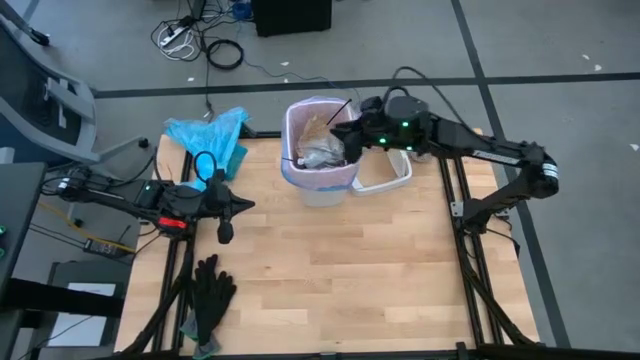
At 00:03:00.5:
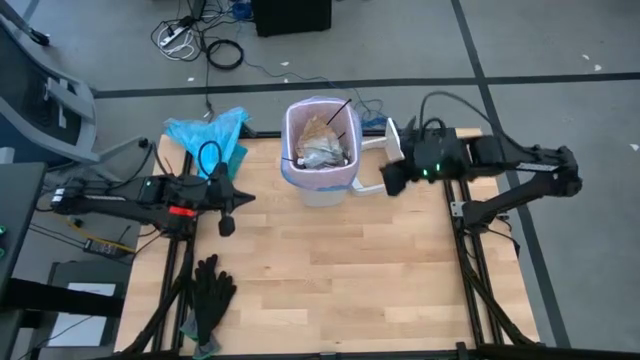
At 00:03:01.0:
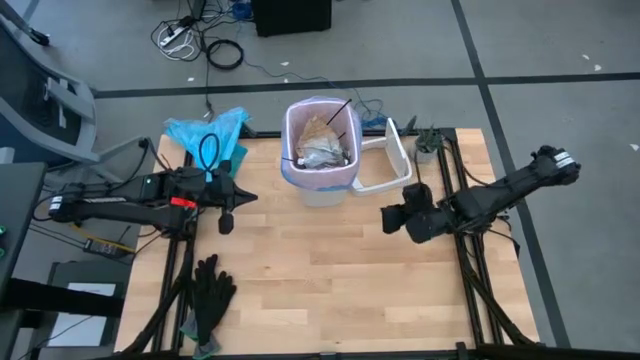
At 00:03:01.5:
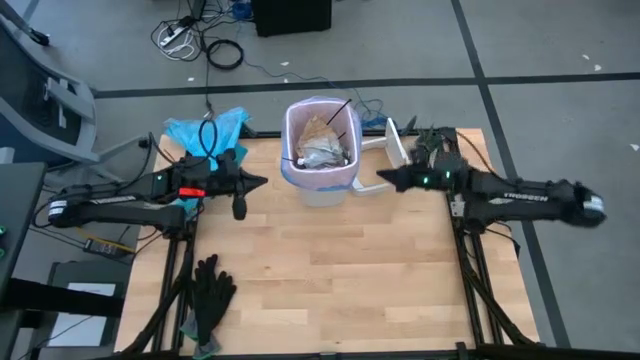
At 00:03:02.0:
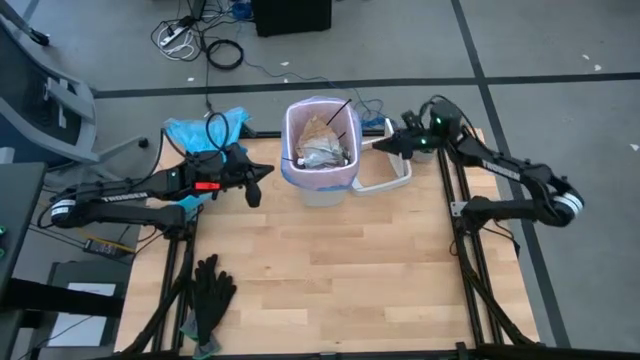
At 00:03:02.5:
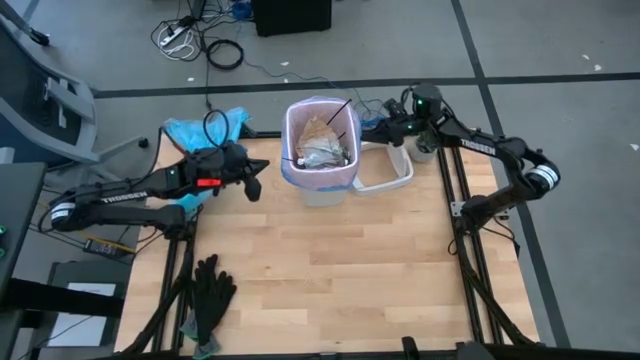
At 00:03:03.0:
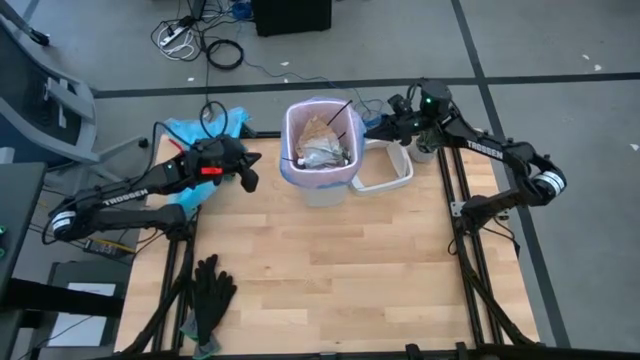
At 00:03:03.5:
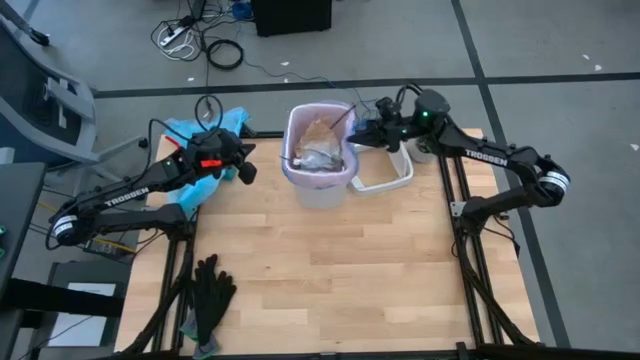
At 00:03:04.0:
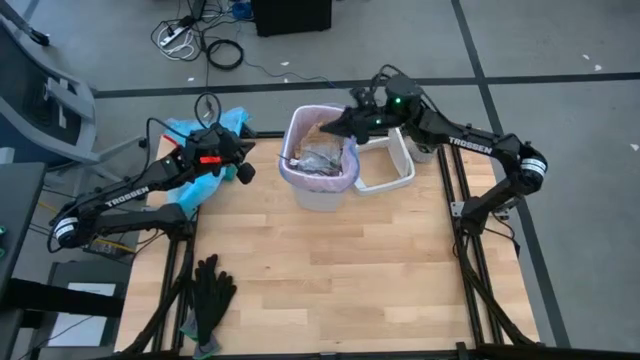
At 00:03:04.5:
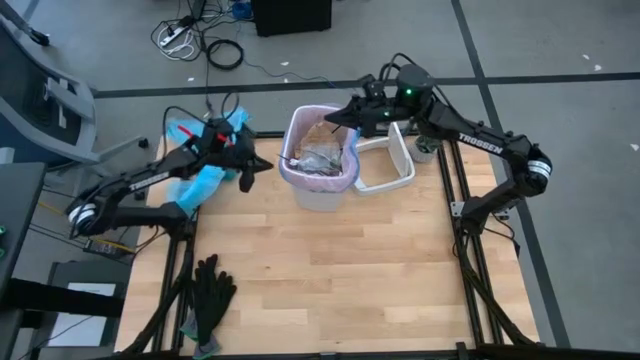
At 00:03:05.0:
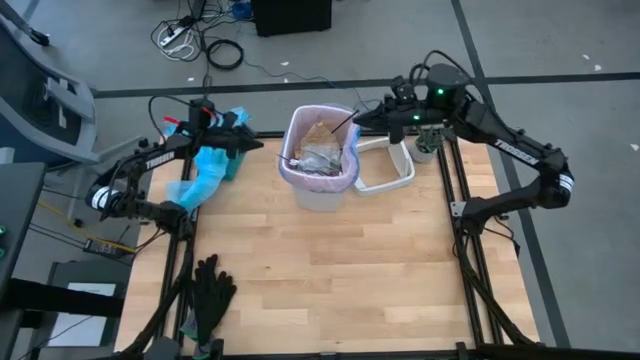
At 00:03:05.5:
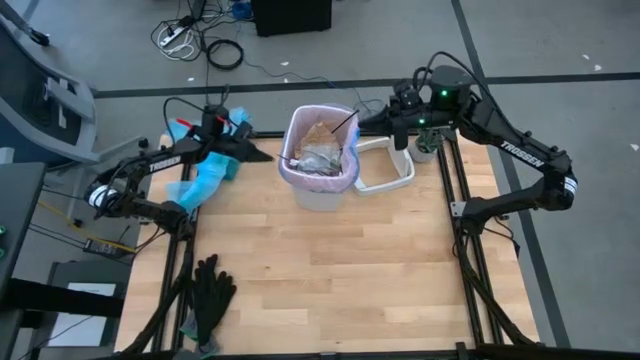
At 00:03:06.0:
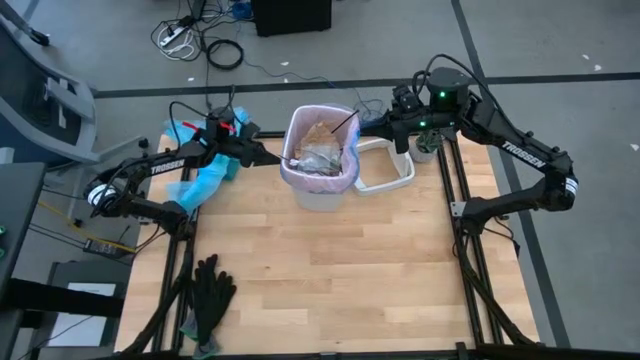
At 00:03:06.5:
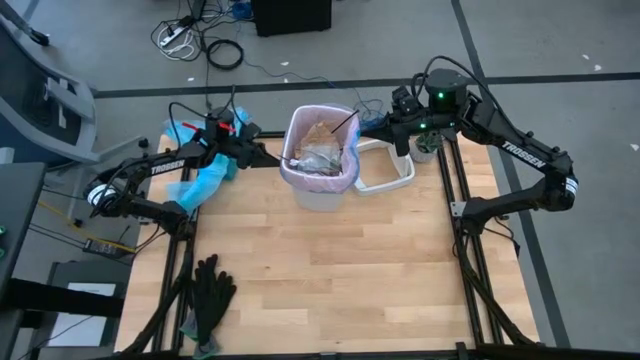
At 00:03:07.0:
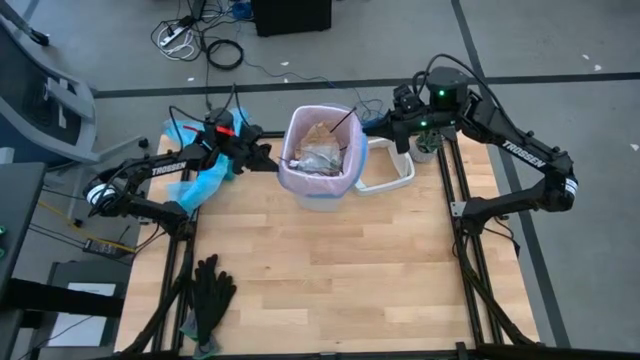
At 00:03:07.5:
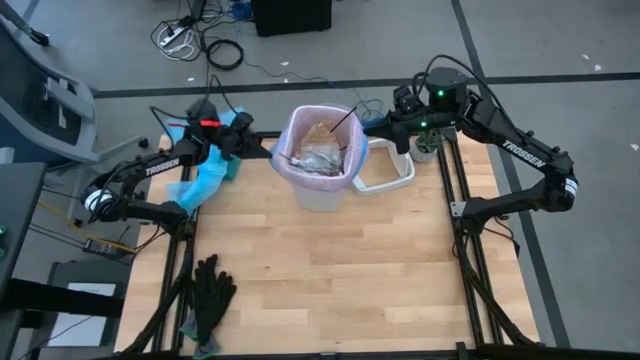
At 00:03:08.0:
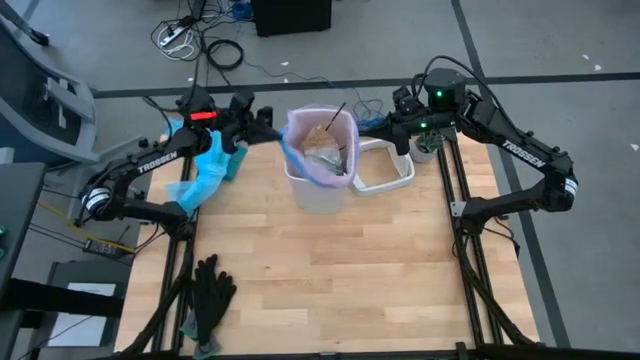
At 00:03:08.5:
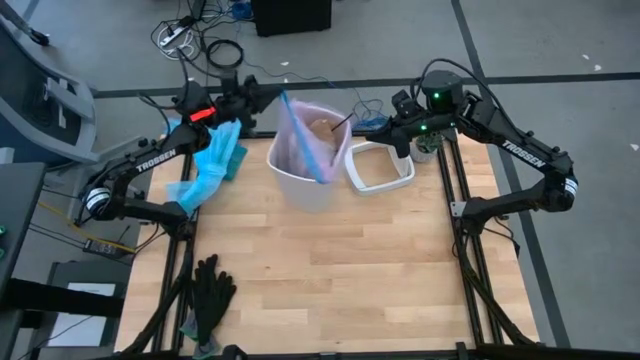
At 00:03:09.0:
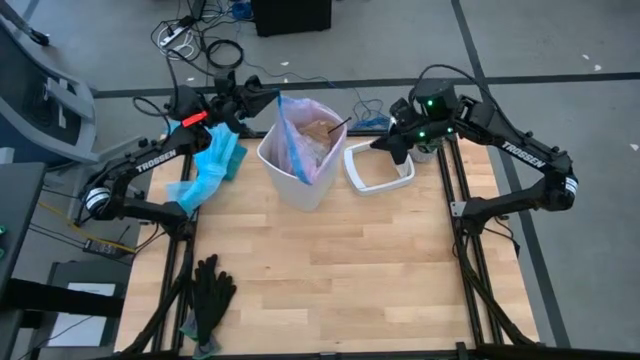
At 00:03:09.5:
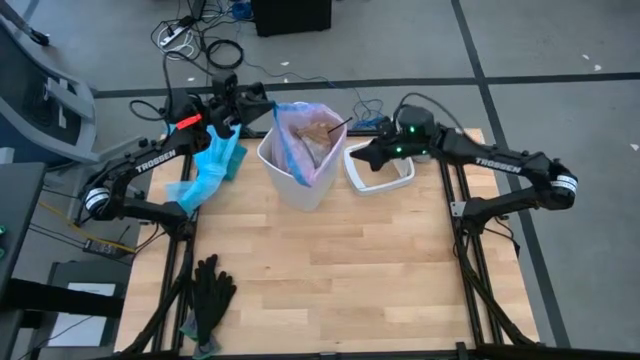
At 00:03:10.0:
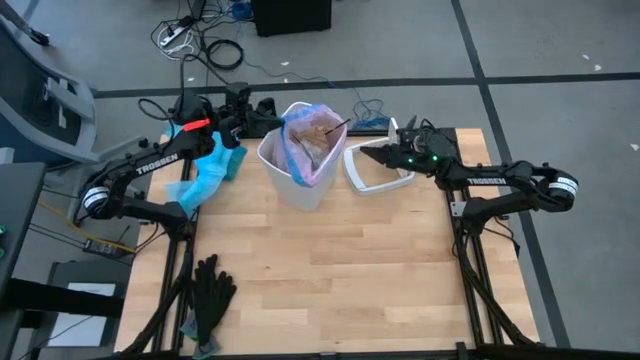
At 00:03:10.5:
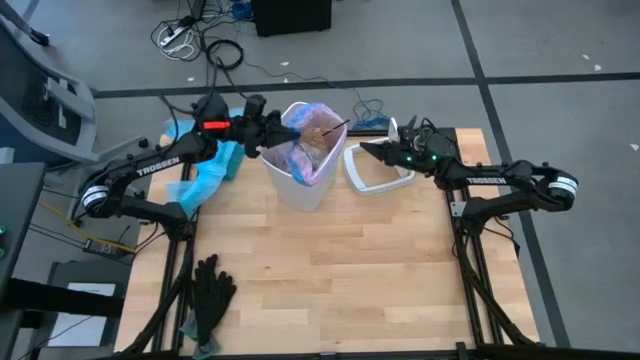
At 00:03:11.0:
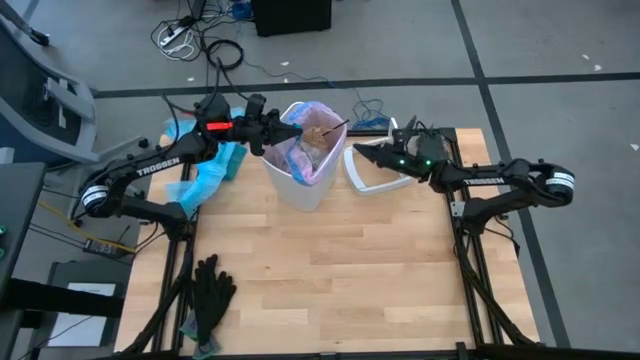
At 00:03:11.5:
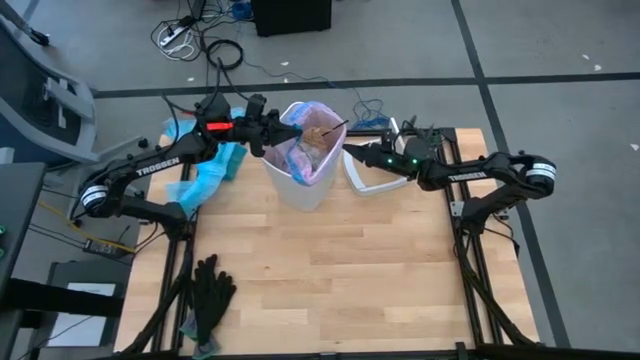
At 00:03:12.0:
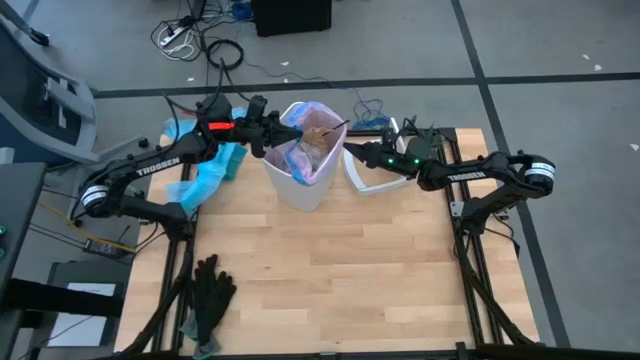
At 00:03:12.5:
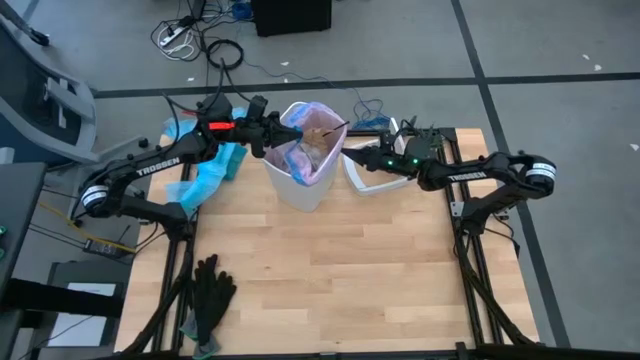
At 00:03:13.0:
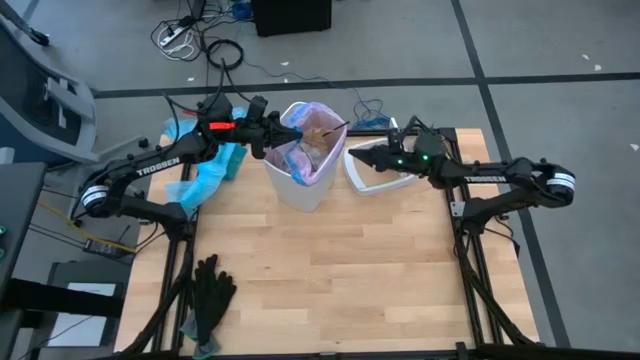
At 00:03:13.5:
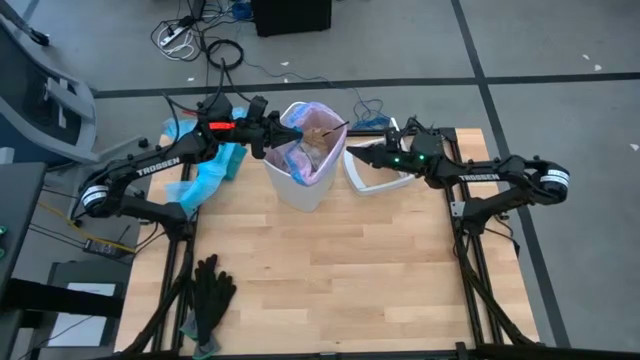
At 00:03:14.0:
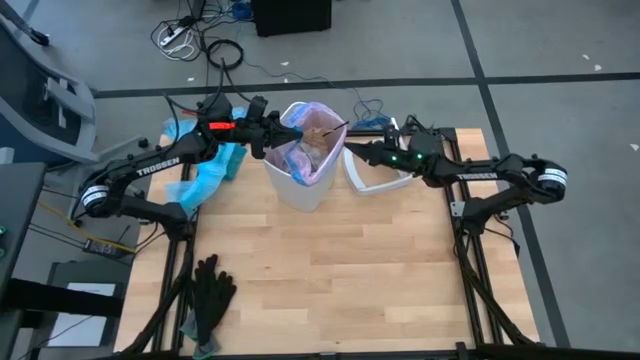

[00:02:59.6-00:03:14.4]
Task: place trash/remove bag and relplace
Remove the pink trash bag from the trash bin

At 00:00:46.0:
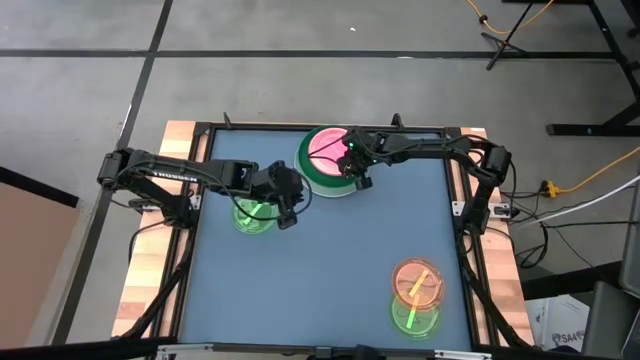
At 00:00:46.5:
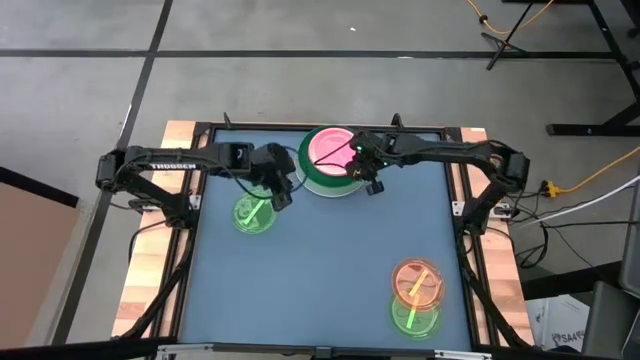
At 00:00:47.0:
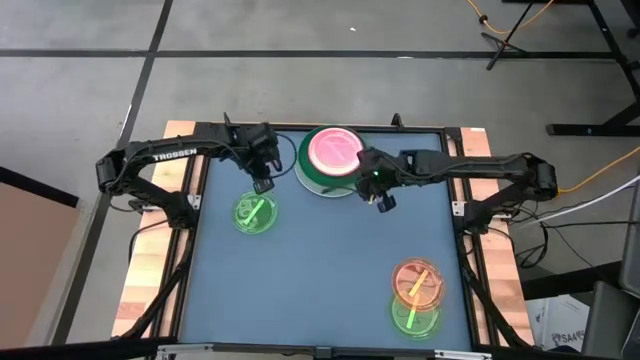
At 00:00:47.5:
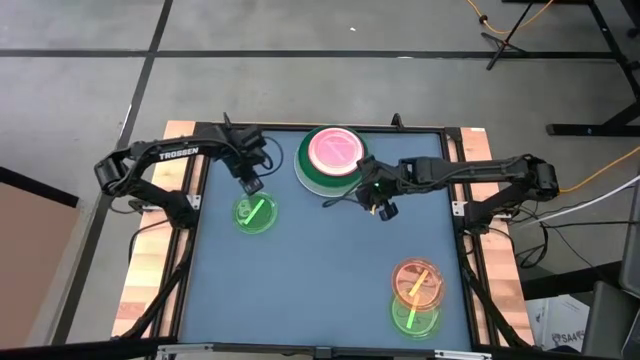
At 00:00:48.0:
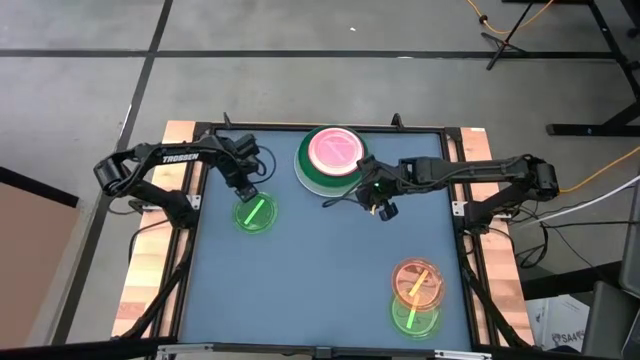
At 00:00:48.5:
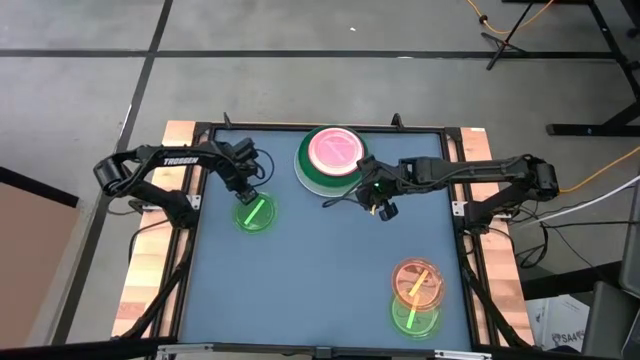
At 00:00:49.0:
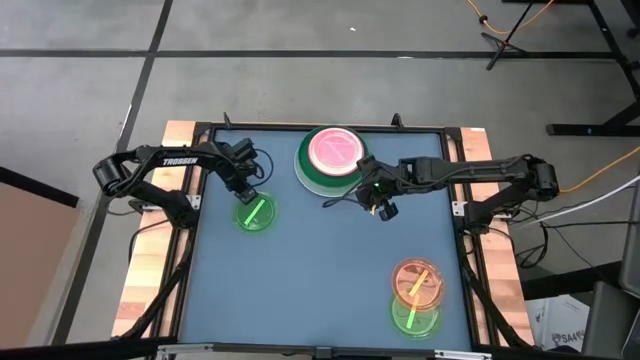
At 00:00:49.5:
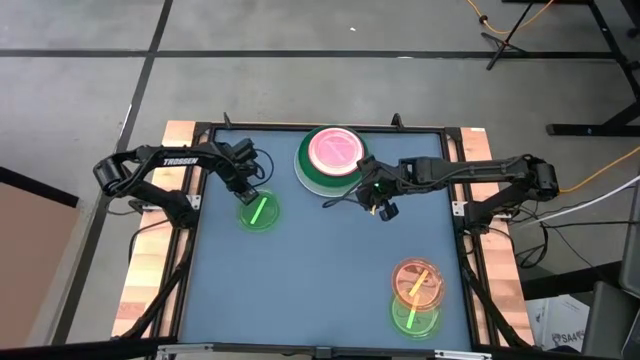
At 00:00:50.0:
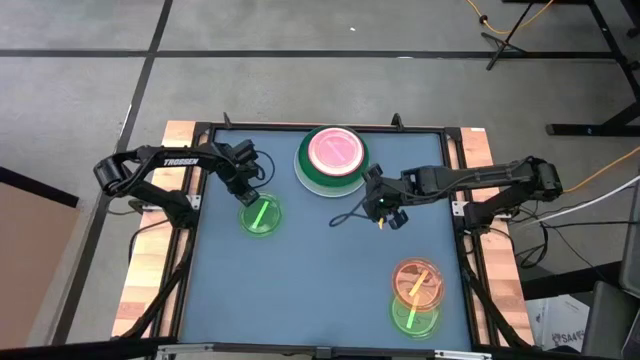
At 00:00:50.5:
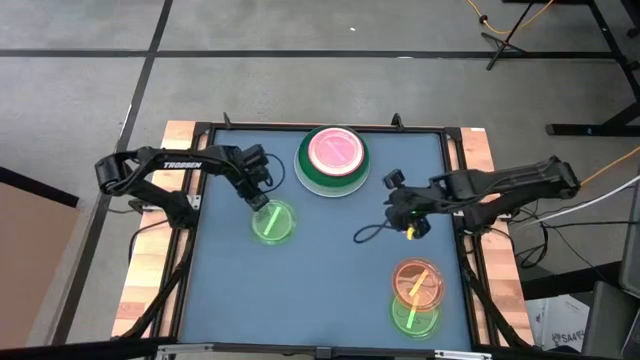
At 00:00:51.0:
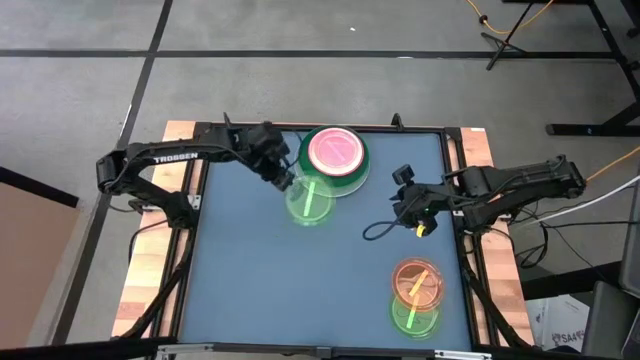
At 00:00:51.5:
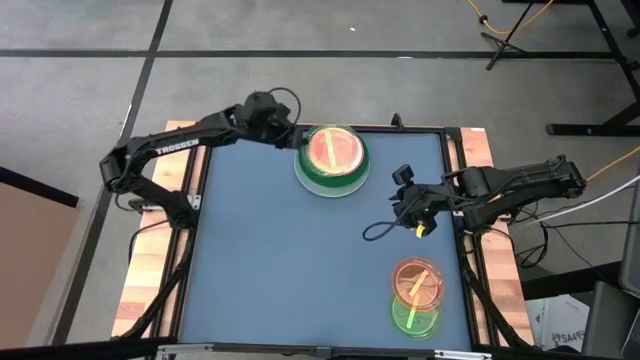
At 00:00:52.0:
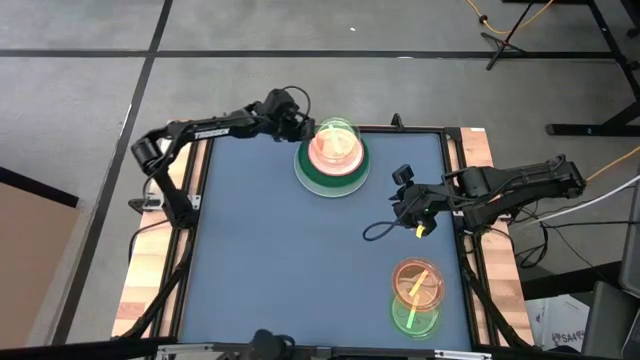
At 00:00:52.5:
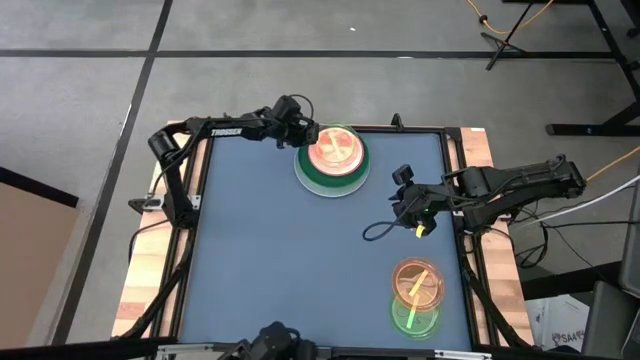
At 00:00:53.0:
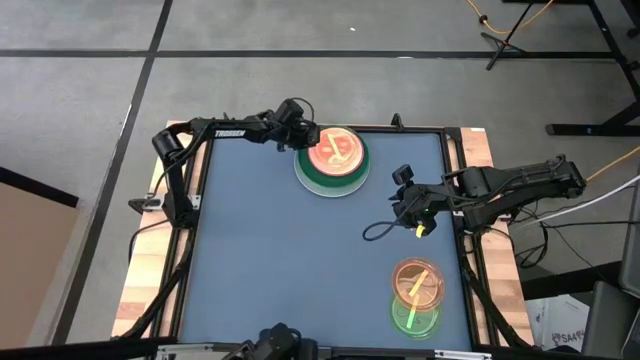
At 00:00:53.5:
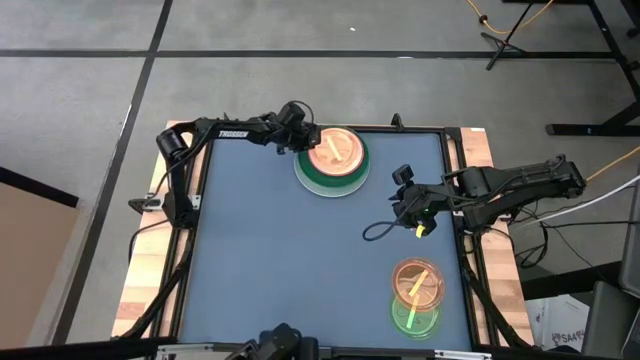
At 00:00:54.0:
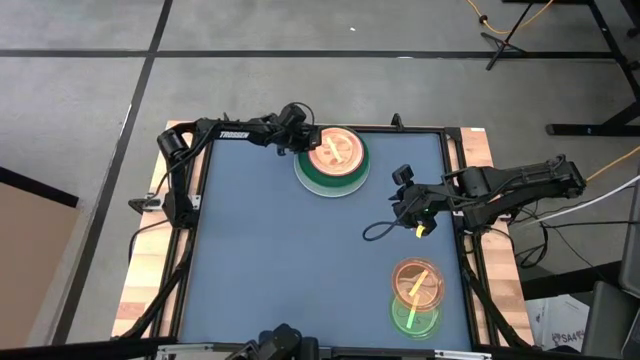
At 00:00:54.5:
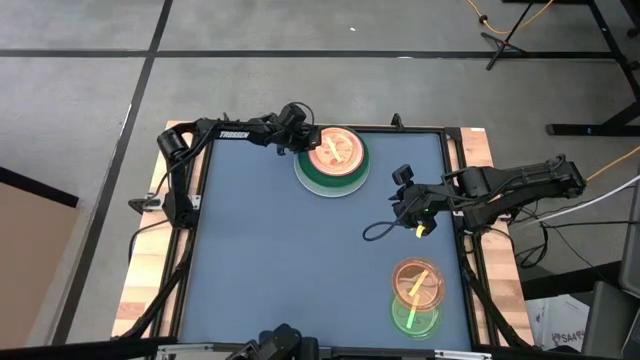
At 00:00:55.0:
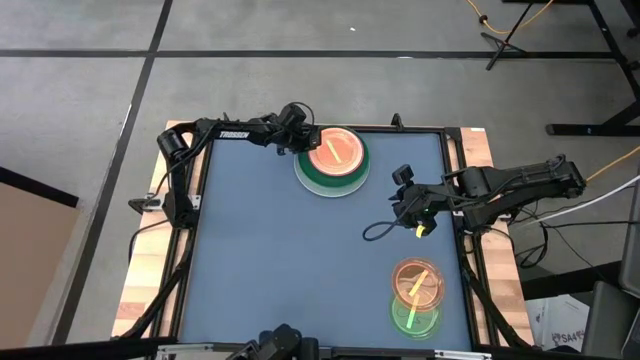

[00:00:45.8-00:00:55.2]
Task: Stack plastic plates
Stack the left light green plate on top of the light pink plate
